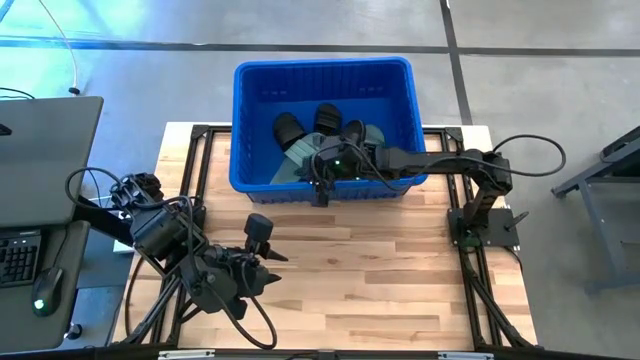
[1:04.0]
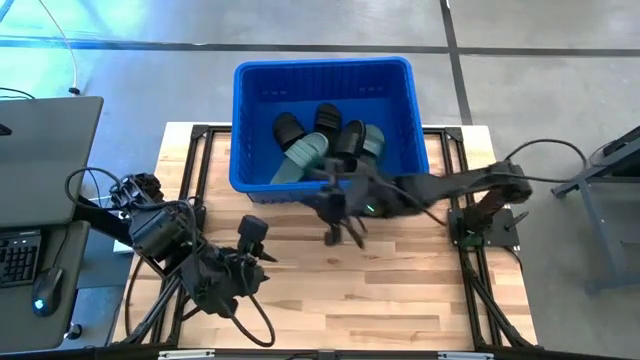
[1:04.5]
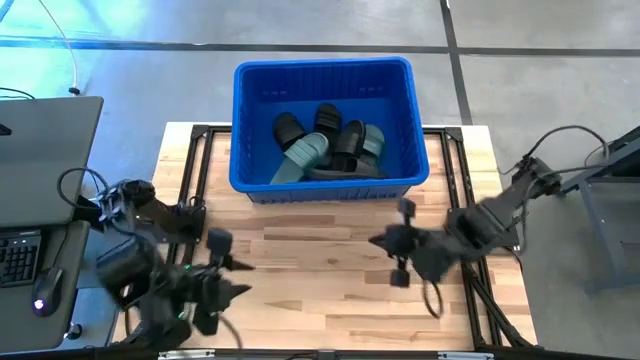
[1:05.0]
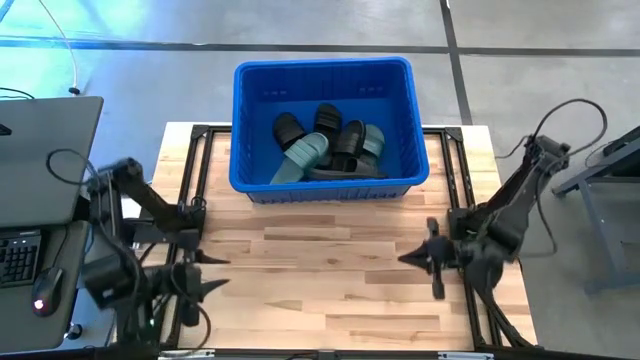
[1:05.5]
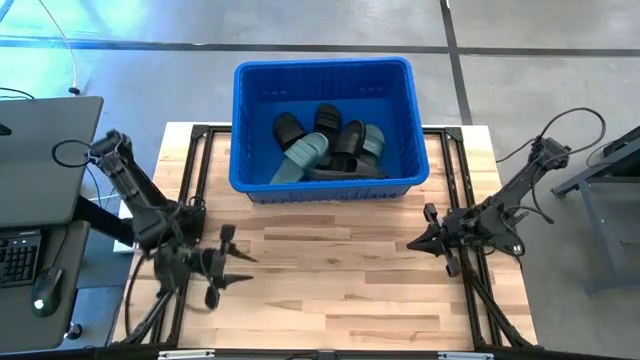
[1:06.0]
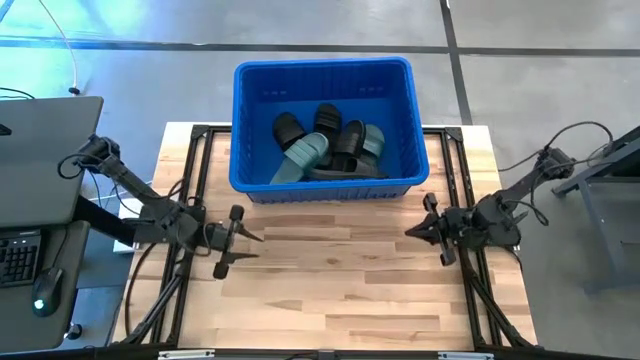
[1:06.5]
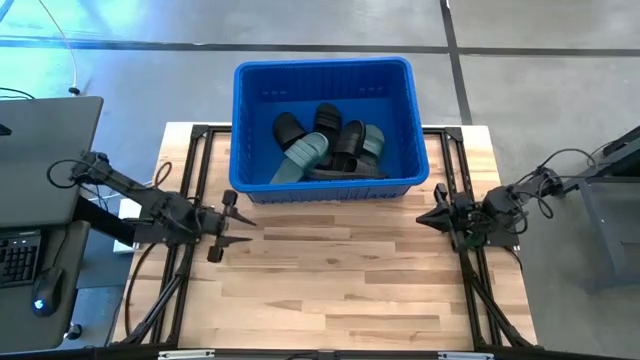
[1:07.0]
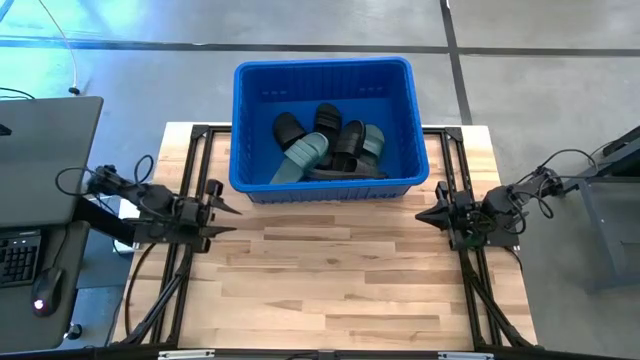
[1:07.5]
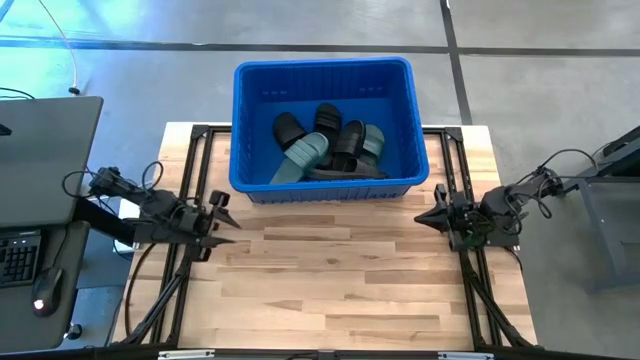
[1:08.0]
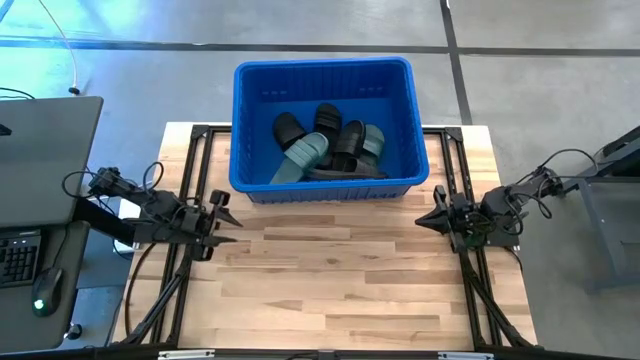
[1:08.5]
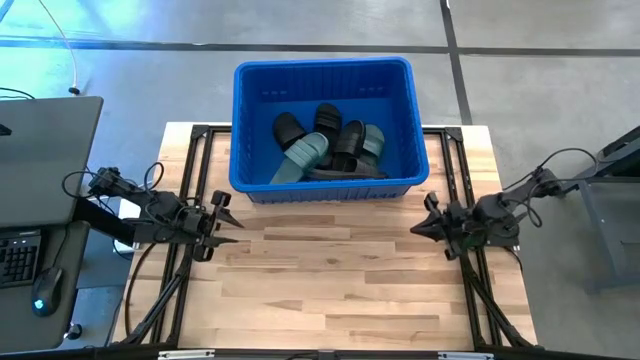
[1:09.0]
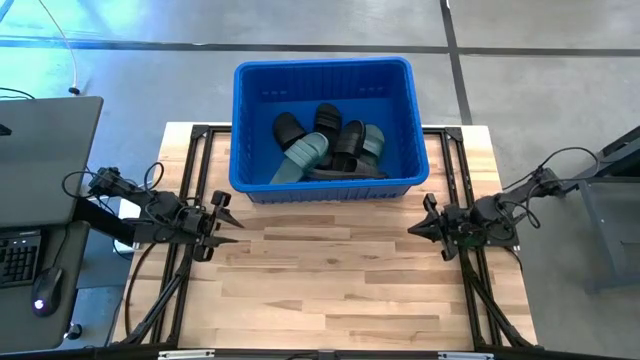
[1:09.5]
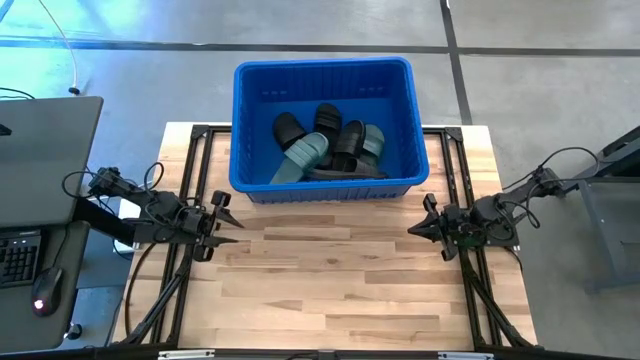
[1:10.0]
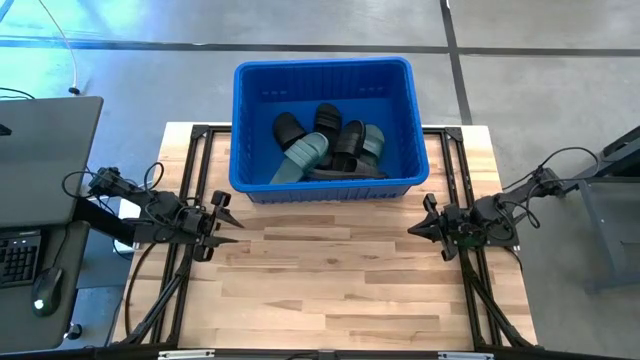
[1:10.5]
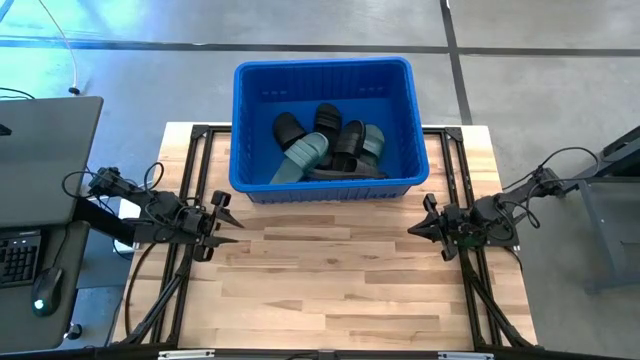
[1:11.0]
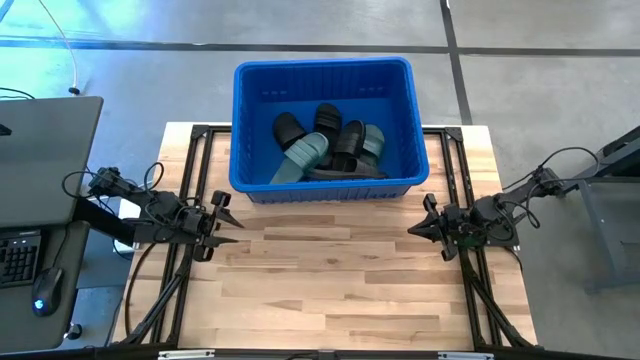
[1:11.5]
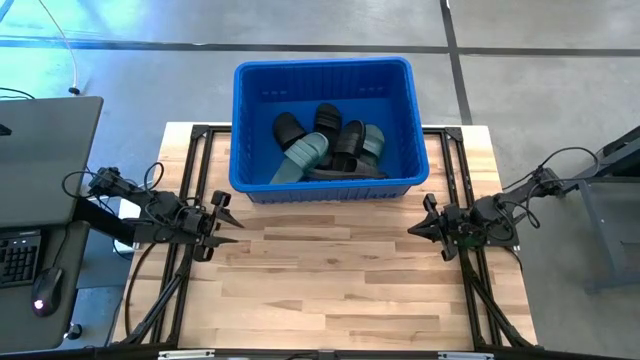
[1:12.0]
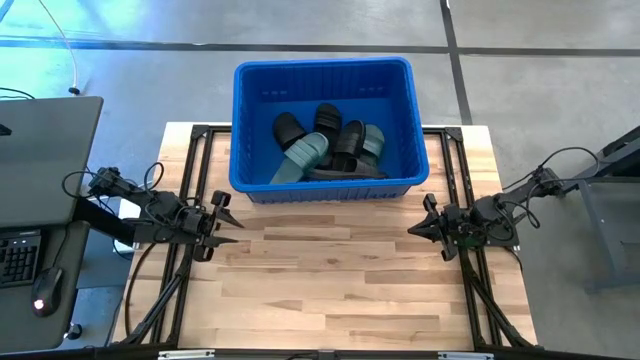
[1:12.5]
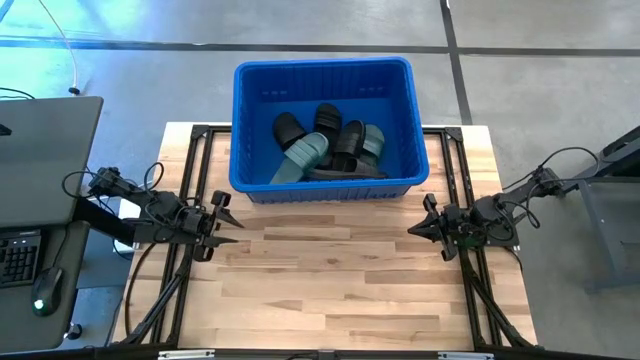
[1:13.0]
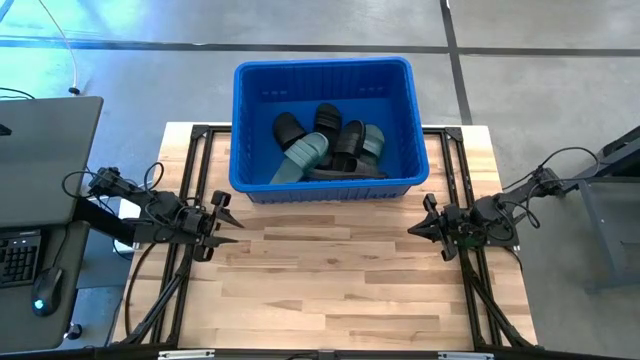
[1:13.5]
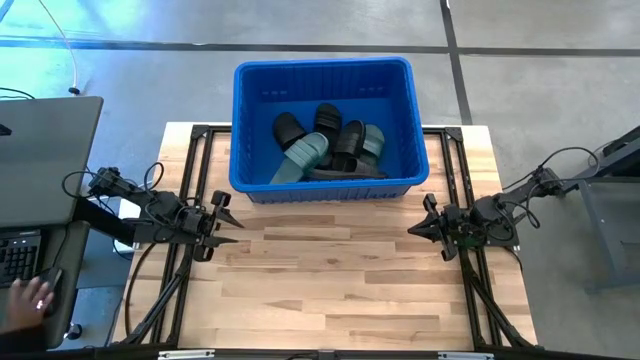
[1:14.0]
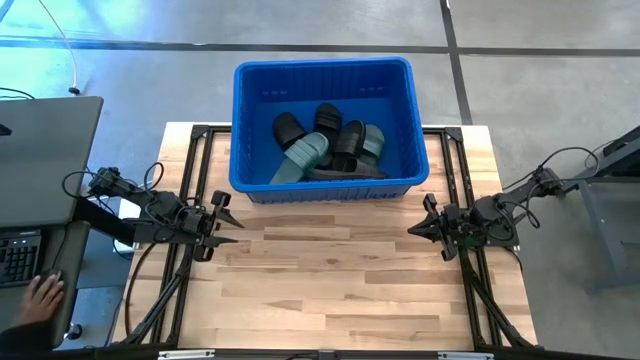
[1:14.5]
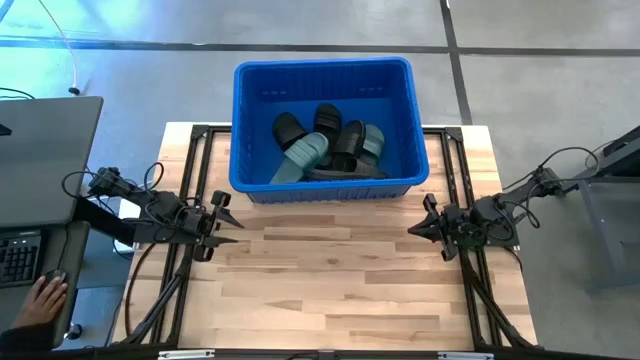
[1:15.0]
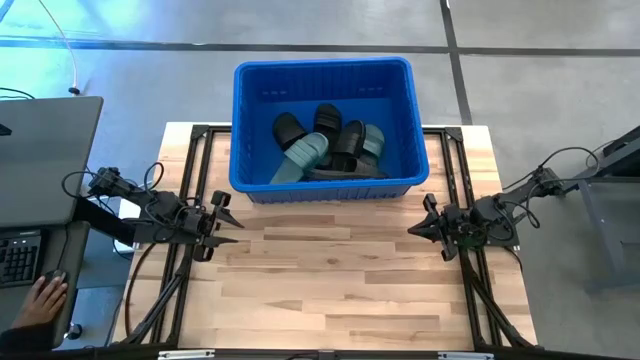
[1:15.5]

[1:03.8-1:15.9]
Task: Pick and place slides into bin
Return to Home Position

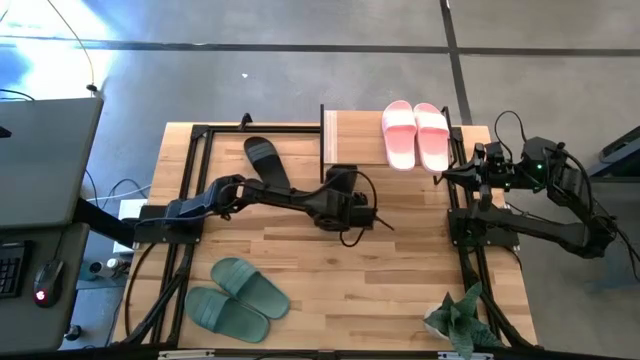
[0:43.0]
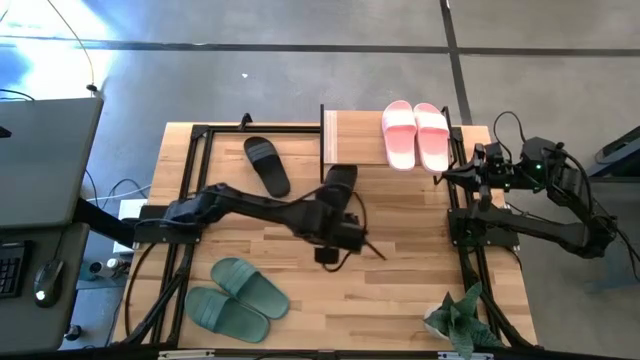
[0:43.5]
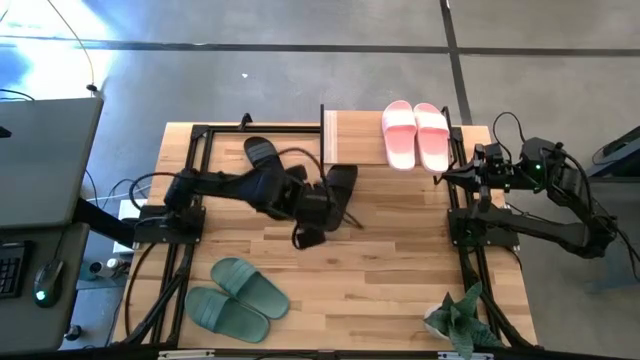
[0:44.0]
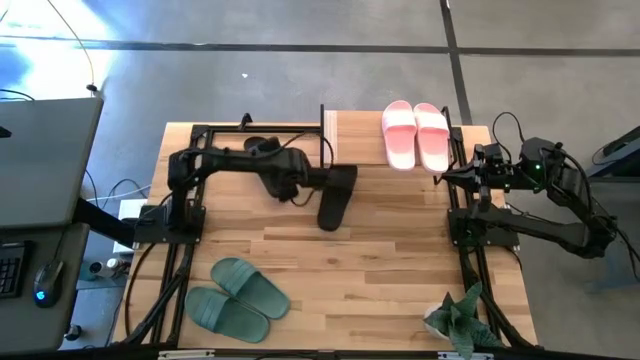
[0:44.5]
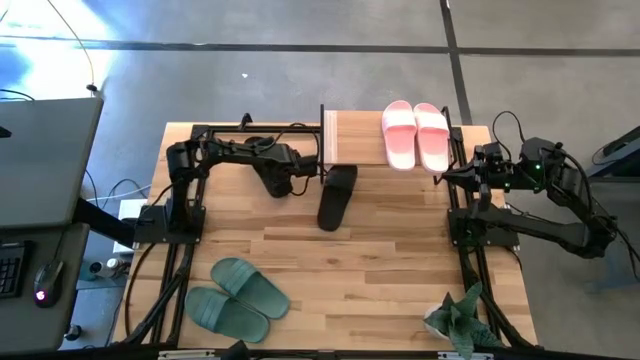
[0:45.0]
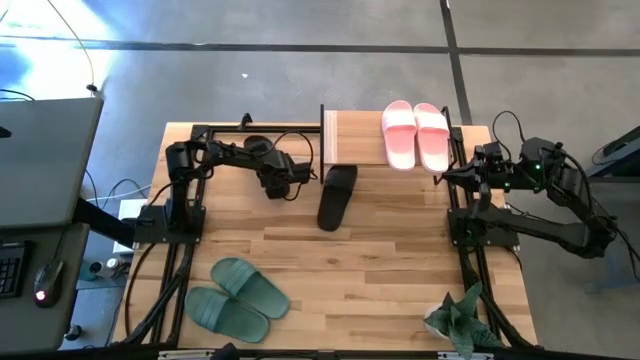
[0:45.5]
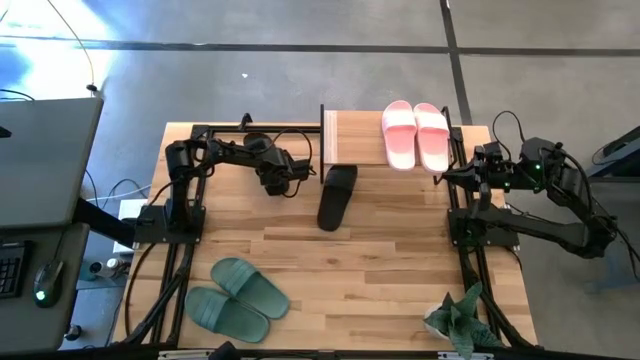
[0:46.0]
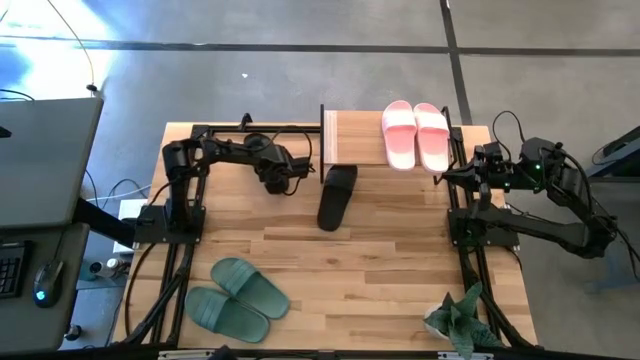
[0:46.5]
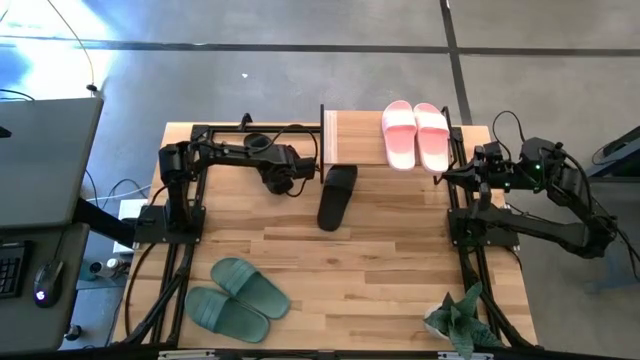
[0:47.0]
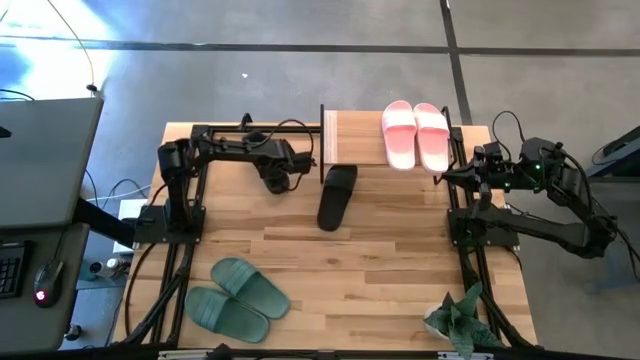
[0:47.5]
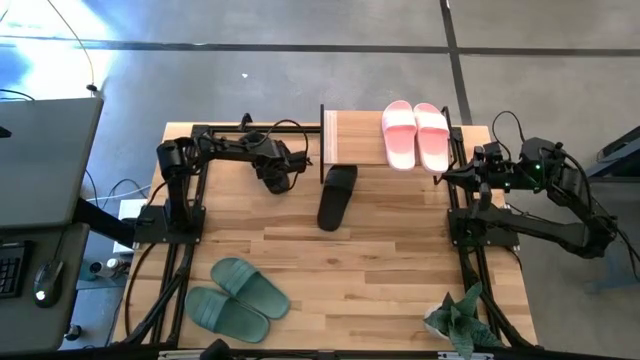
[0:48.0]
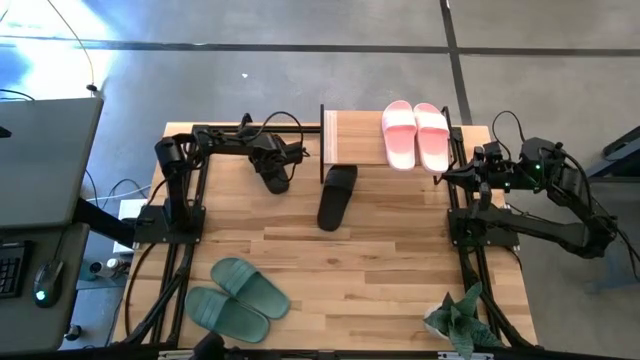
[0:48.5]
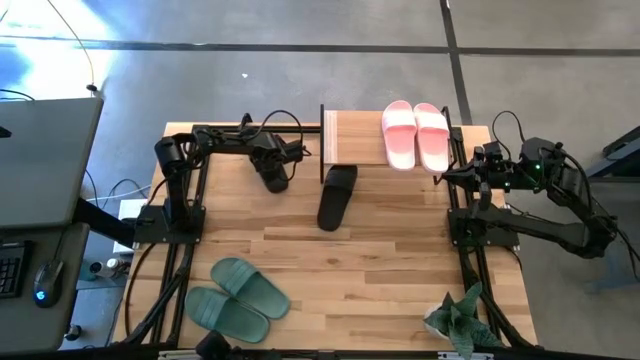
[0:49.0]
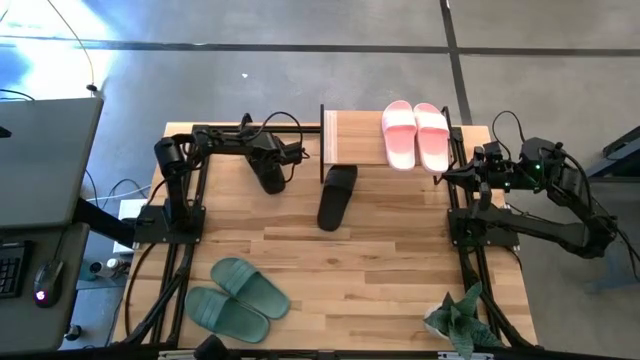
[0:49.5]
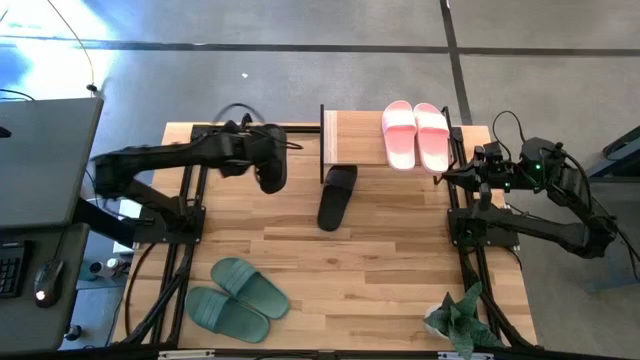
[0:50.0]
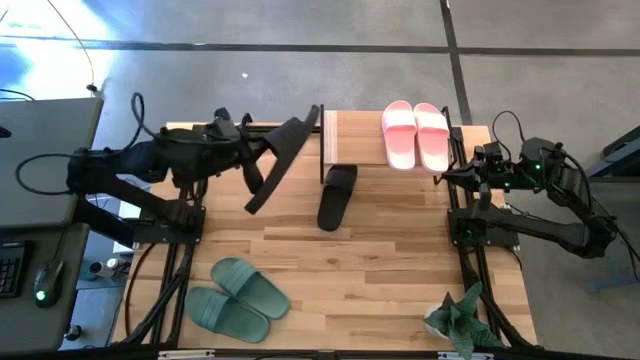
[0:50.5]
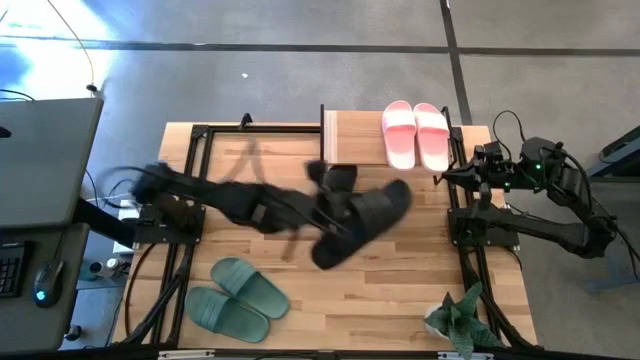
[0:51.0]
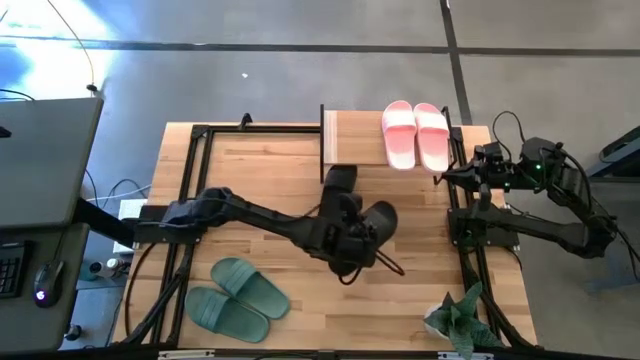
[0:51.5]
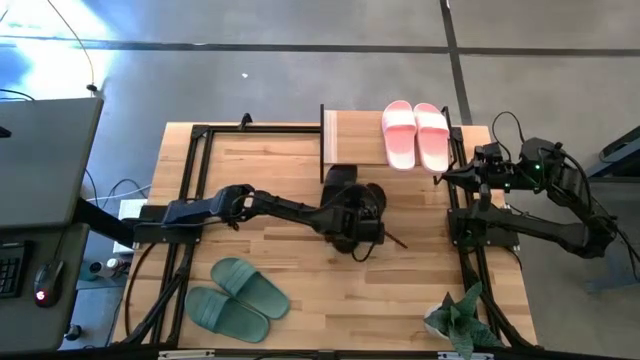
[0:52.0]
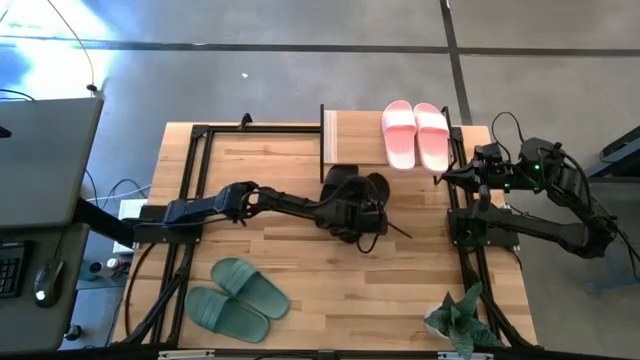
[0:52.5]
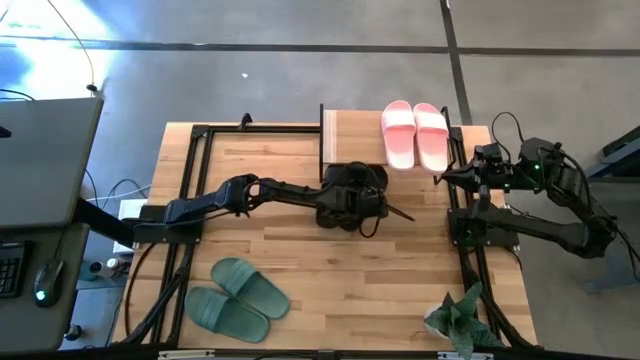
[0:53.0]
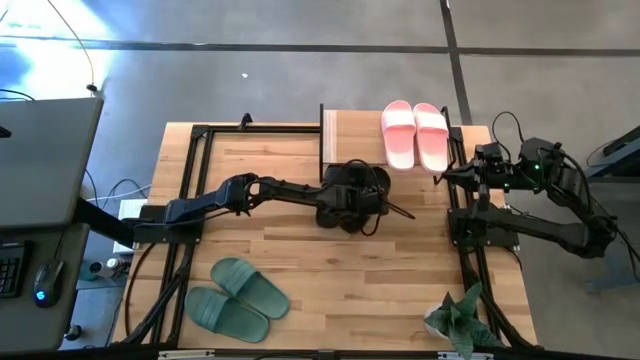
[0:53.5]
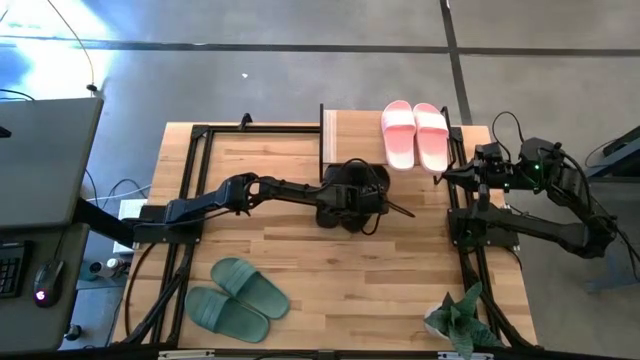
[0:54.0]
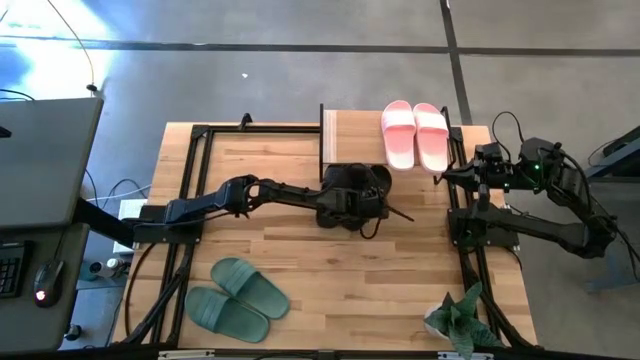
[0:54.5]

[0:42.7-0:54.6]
Task: Pick and place slides into the shelf
Move the black slide in front of the shelf
